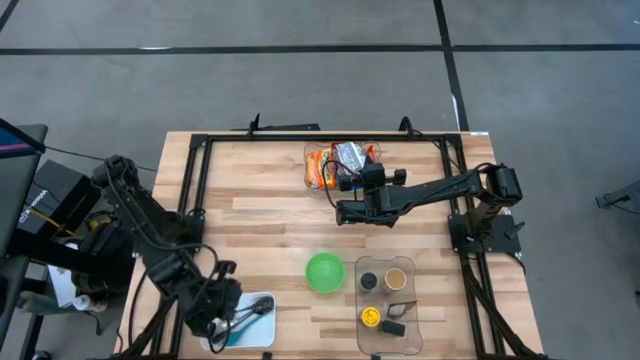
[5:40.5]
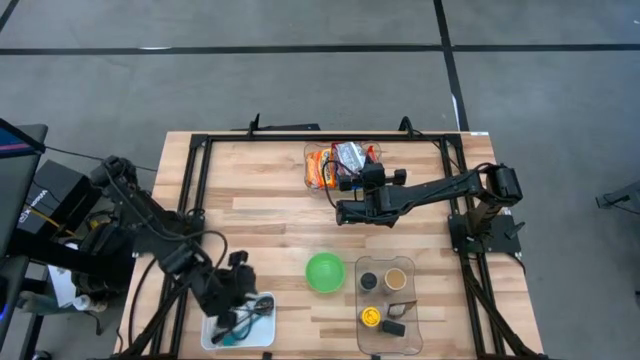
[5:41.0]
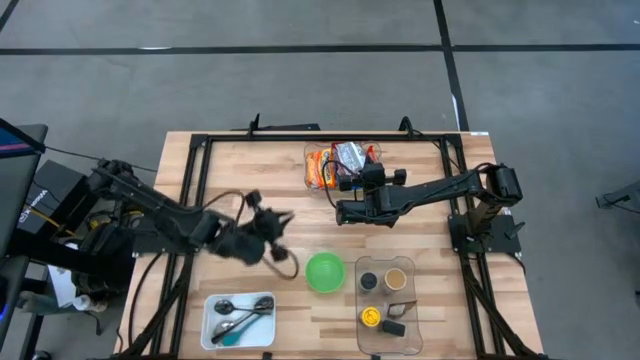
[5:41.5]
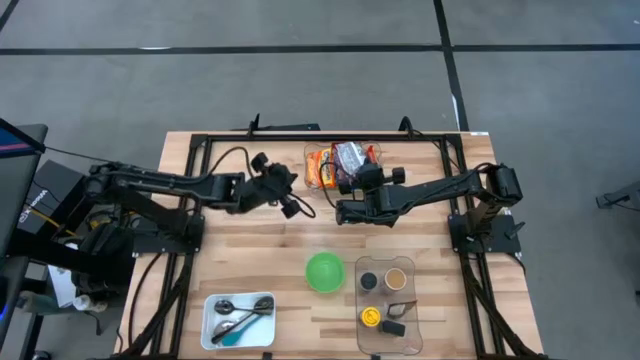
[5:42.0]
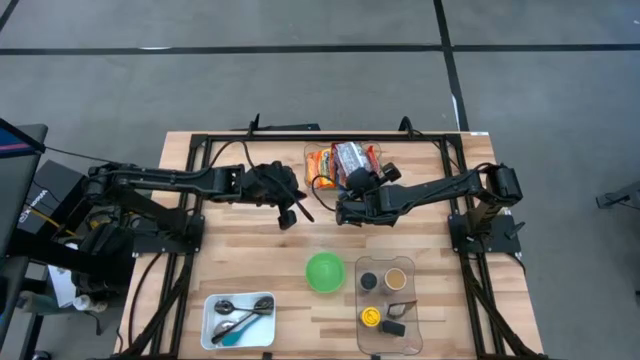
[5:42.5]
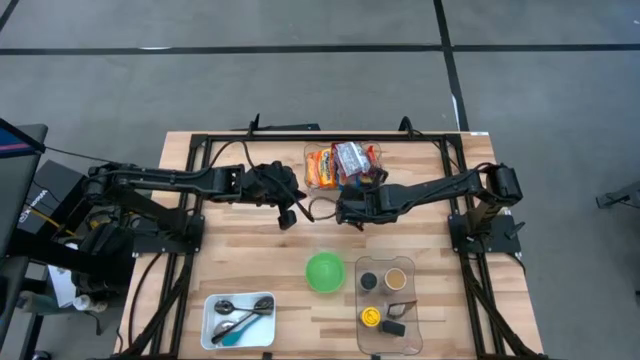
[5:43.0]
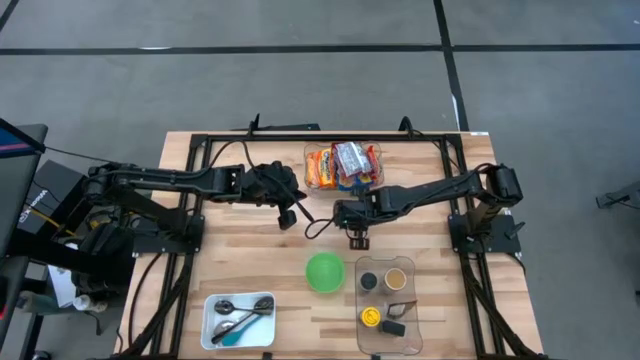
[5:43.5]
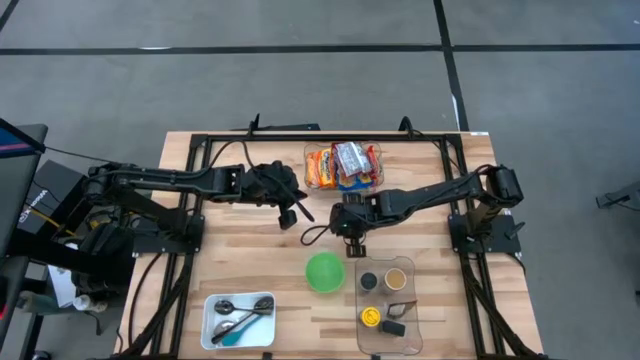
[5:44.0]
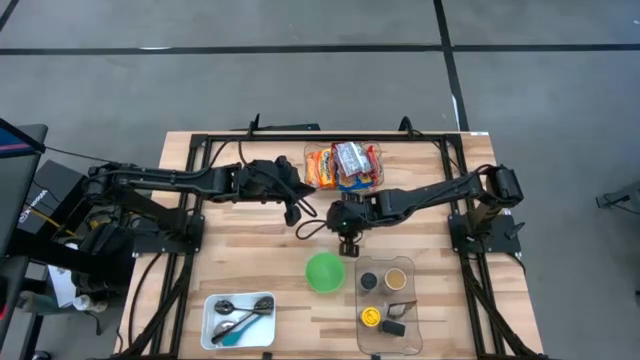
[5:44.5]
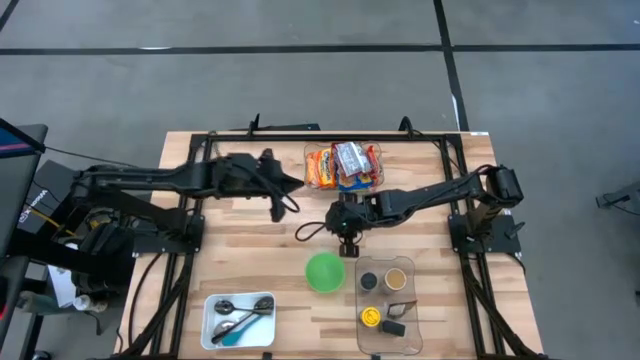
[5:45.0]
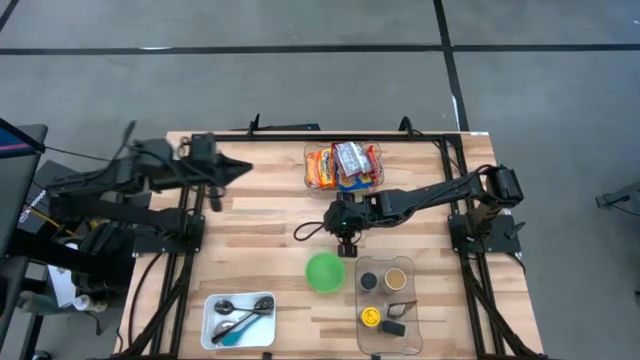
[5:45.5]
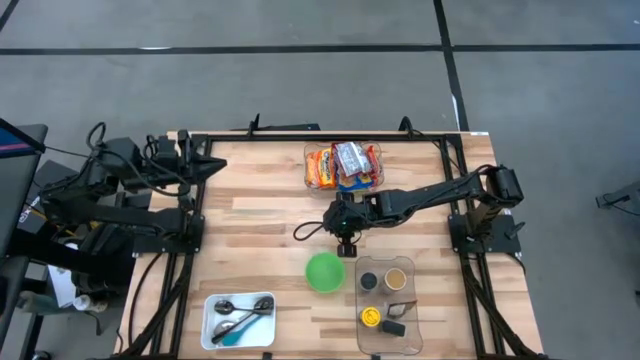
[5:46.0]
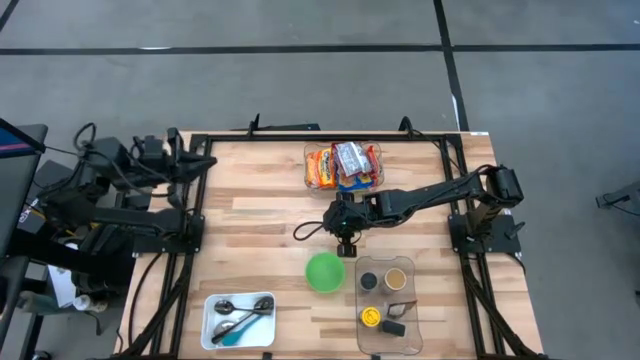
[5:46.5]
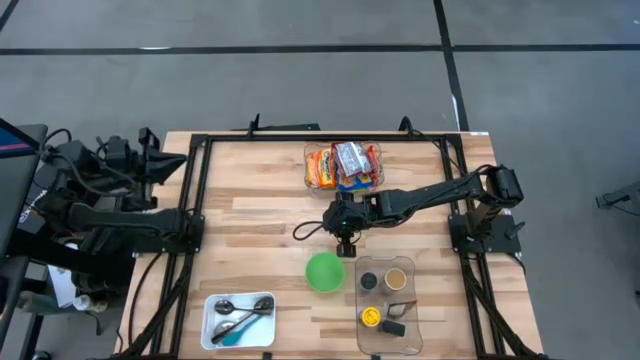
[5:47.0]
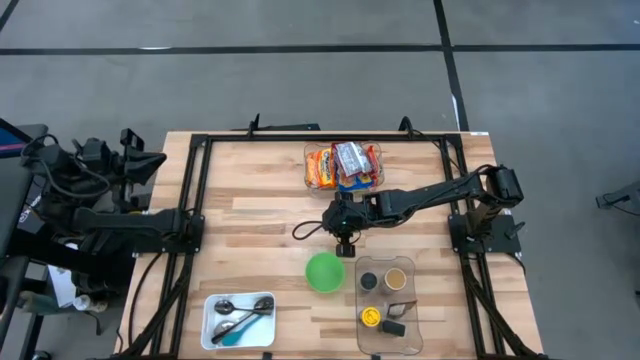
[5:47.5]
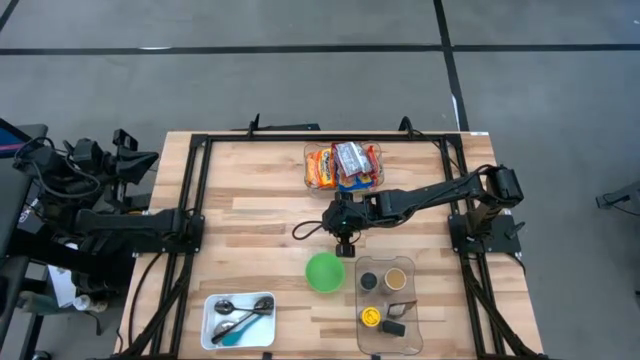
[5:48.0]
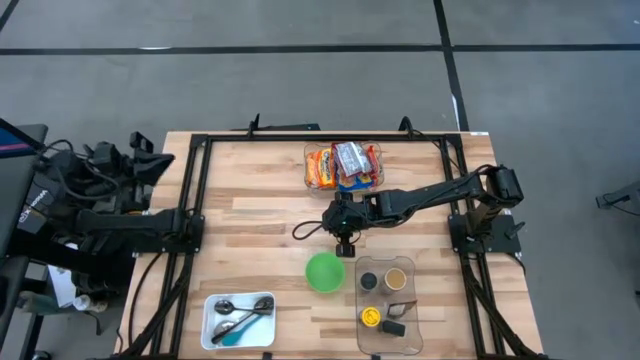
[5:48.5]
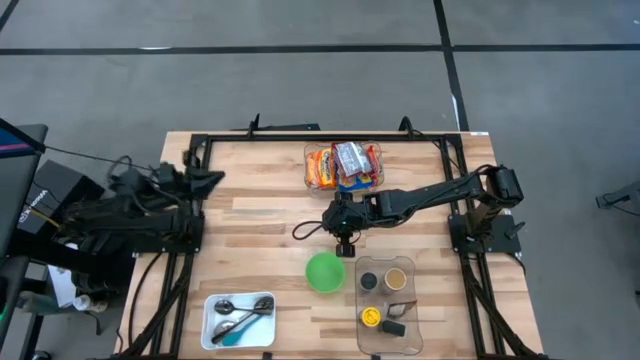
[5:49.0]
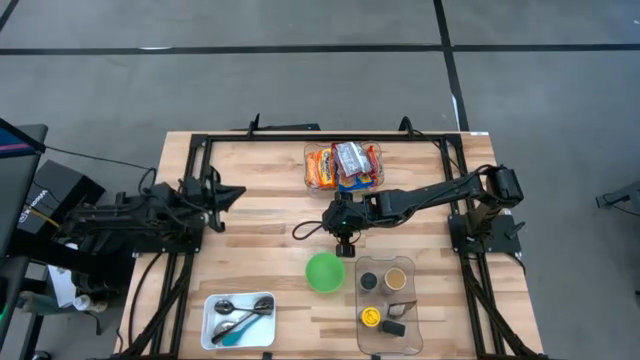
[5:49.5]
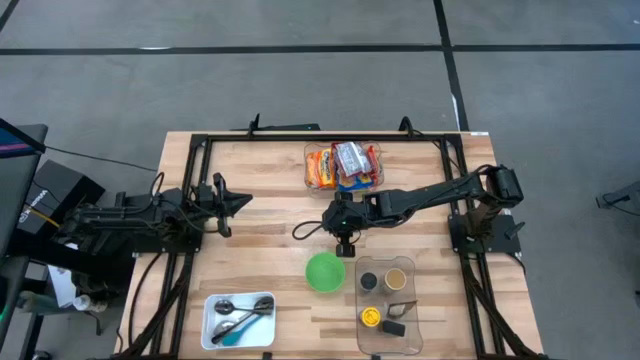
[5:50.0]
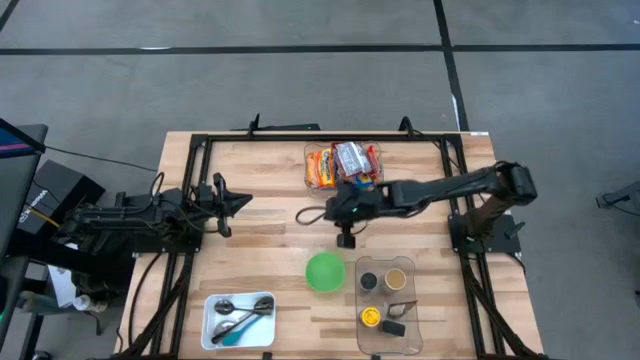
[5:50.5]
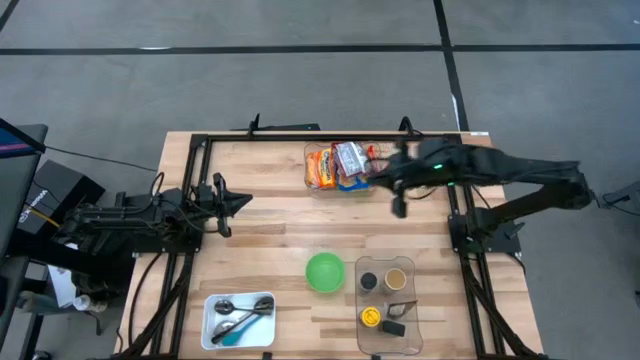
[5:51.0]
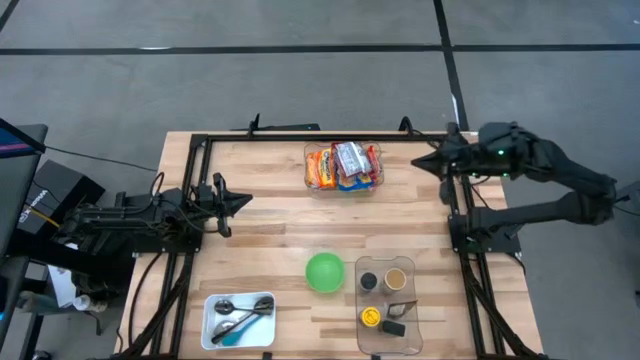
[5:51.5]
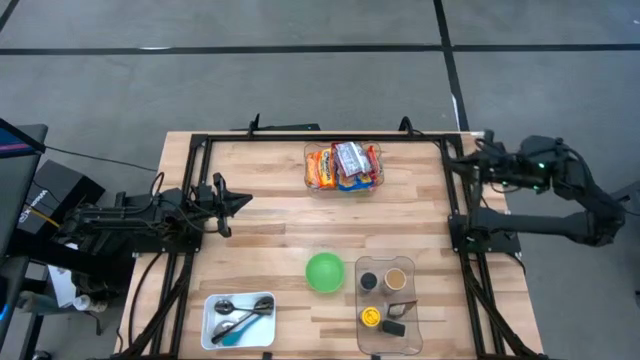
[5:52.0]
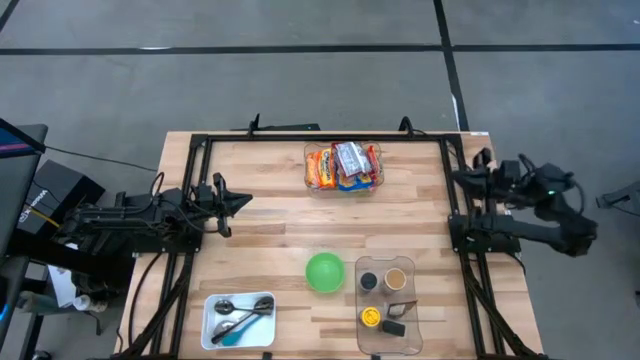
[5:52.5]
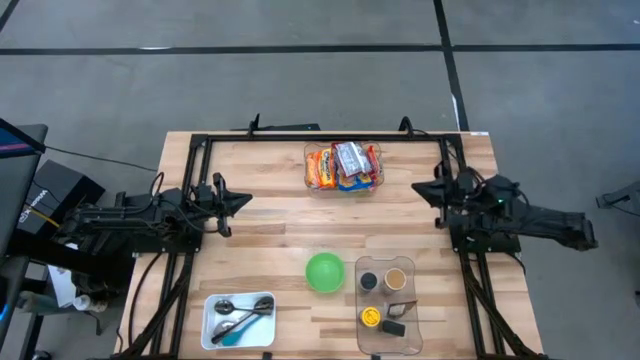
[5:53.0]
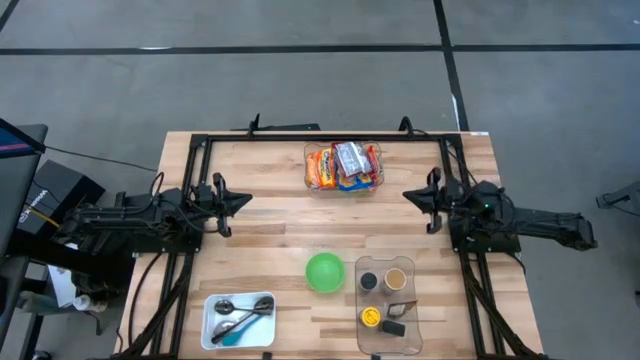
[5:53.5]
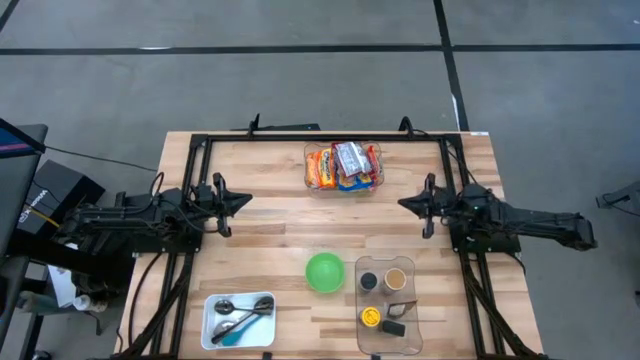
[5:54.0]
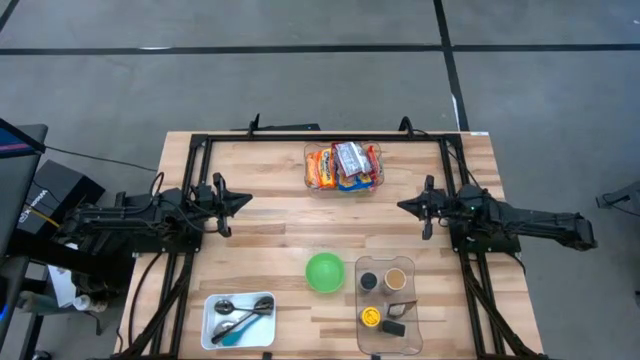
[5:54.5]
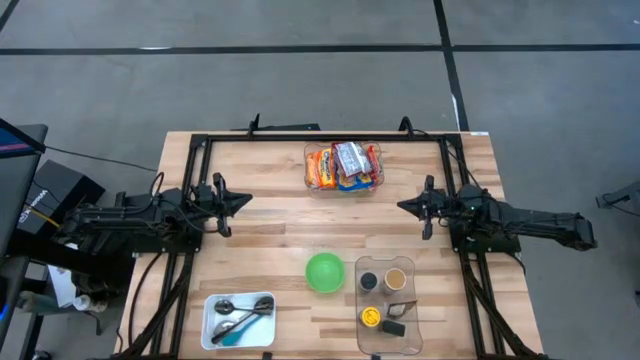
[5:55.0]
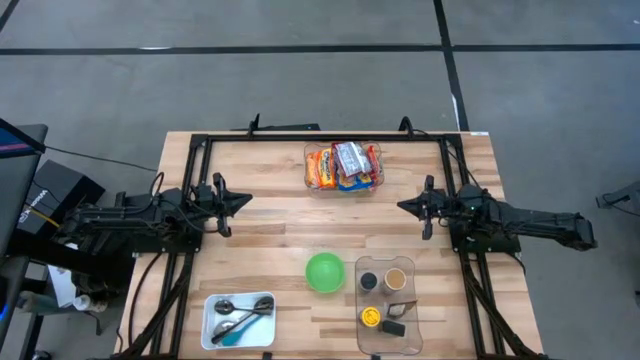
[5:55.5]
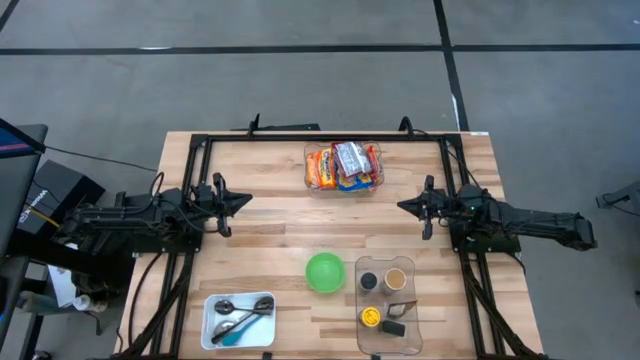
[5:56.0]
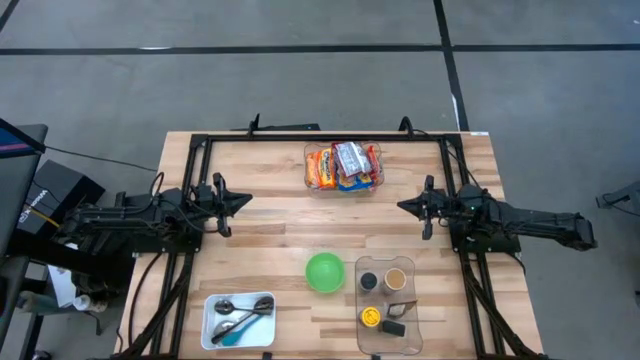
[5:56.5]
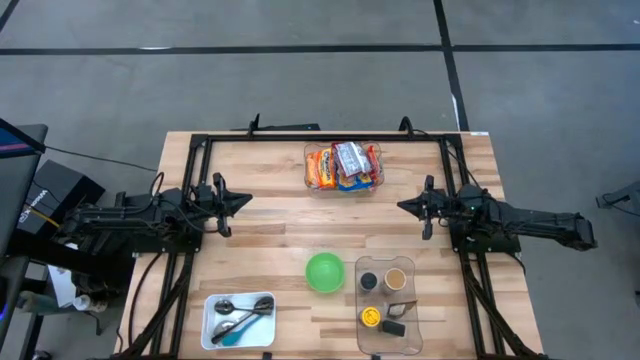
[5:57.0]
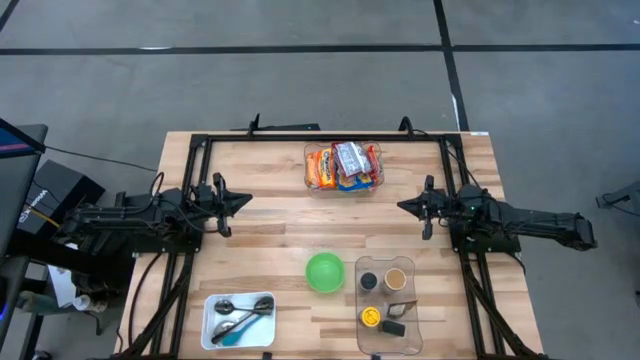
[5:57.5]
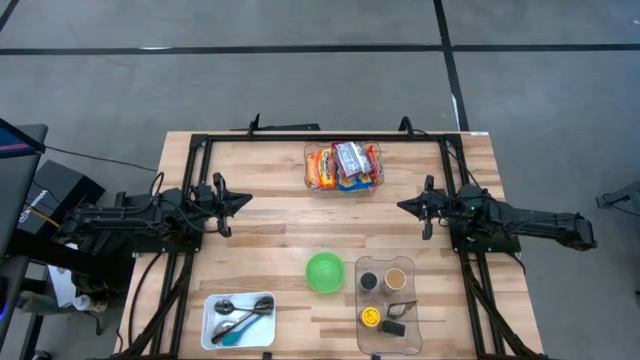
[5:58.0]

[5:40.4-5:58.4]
Task: Pick & Place Food Item
Return to Home Position

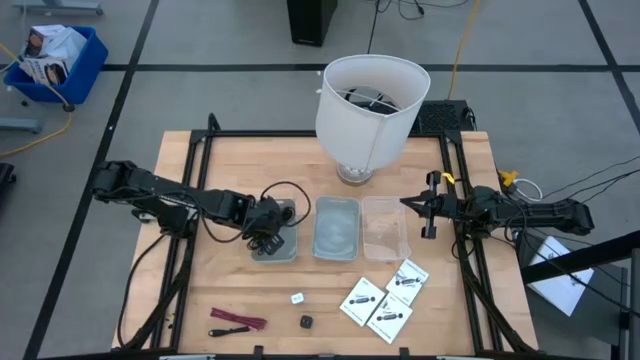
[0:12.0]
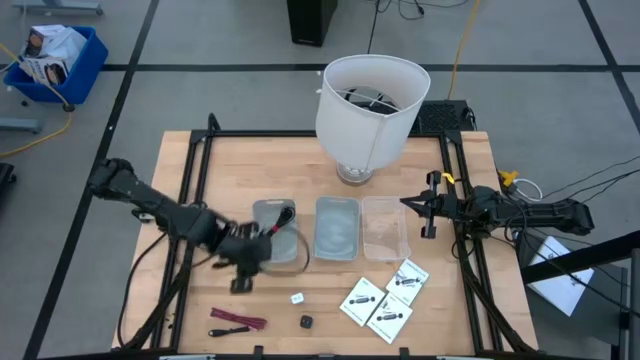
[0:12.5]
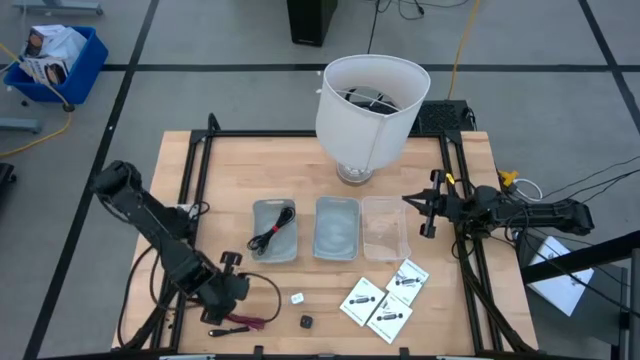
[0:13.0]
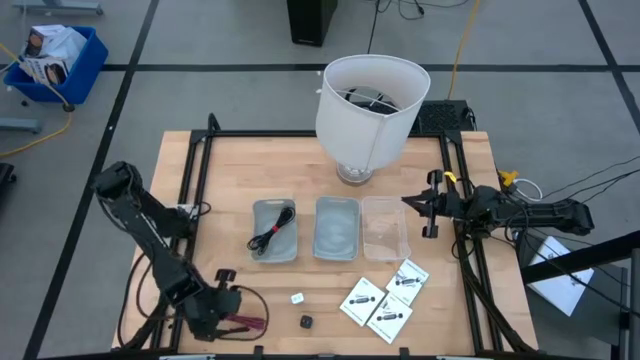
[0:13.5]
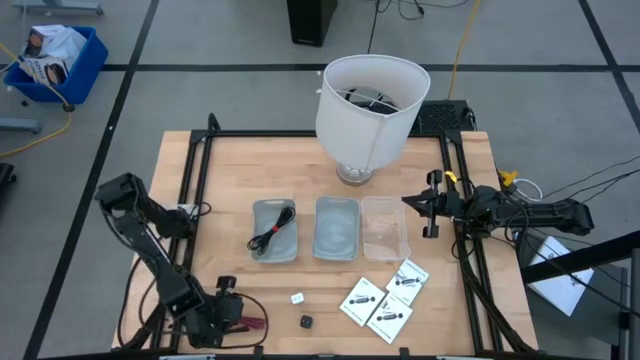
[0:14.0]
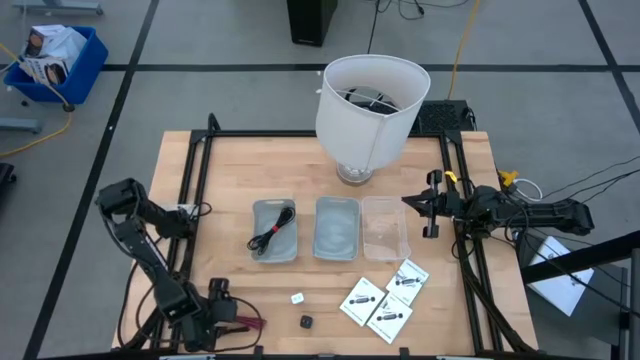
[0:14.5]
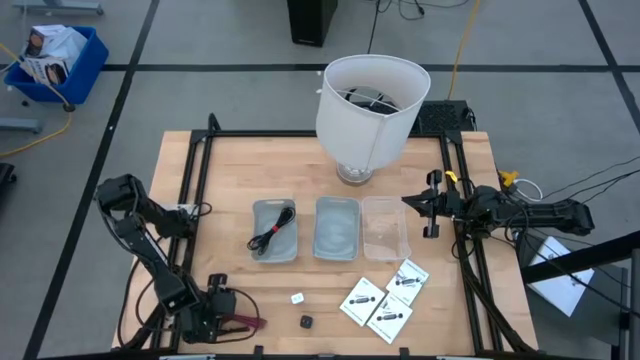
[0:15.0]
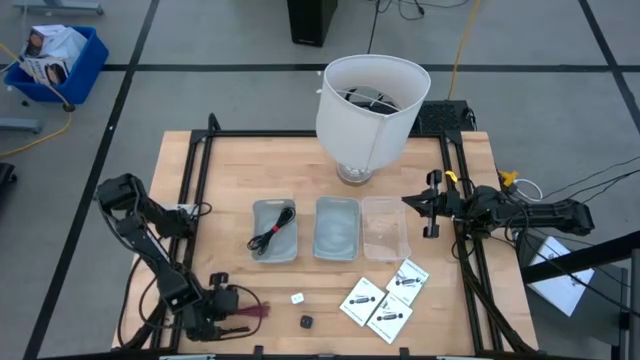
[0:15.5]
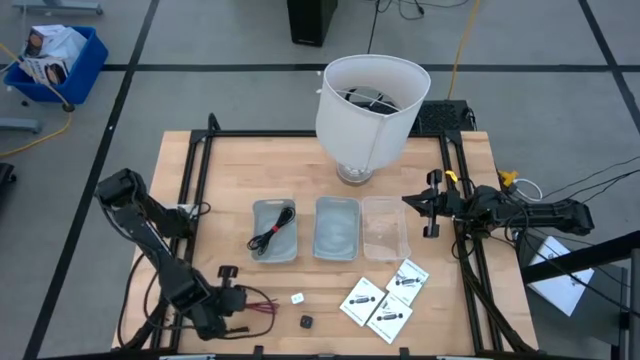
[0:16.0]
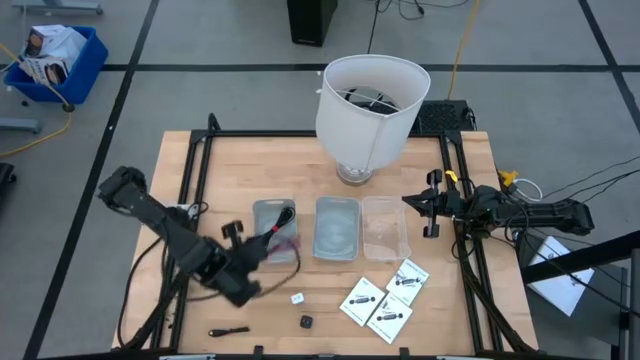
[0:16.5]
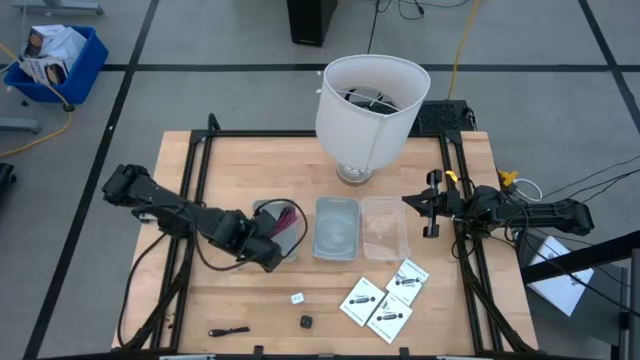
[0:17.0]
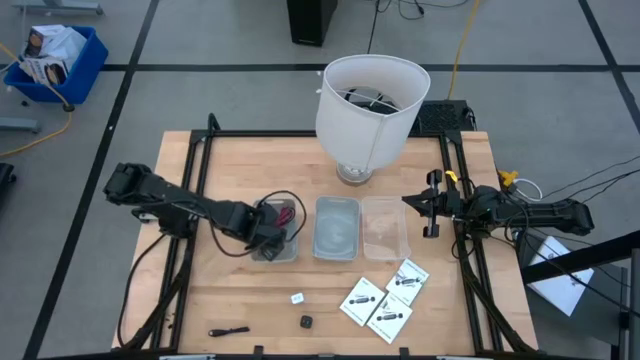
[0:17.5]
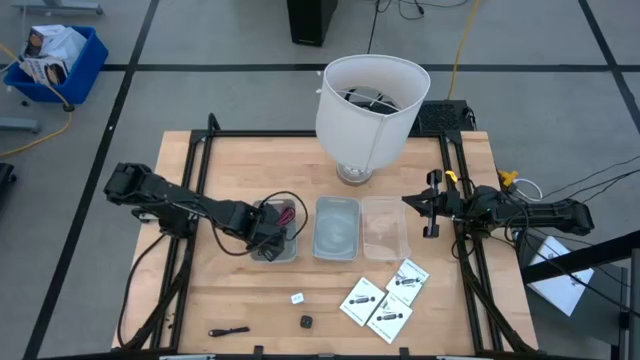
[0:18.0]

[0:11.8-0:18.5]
Task: Pick and place items into bin
Put the pink charger cable into the left gray bin
